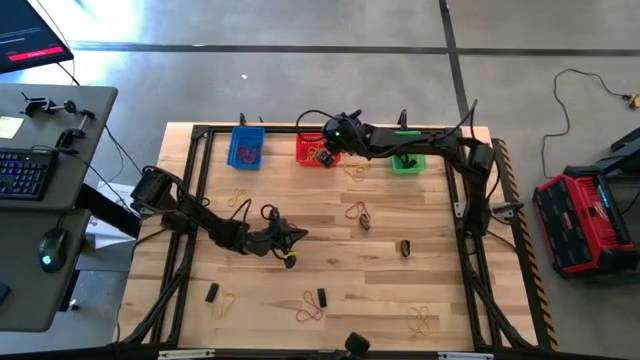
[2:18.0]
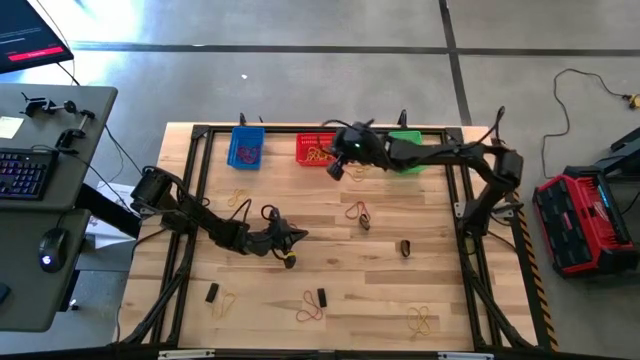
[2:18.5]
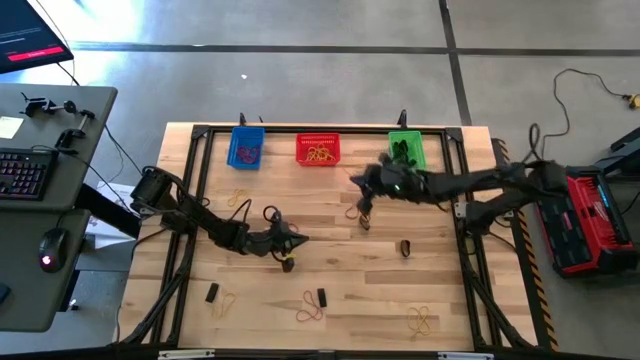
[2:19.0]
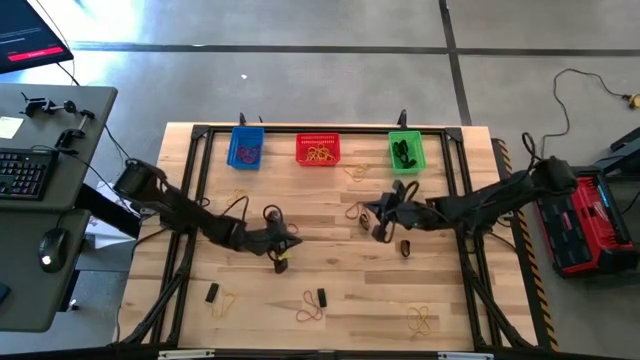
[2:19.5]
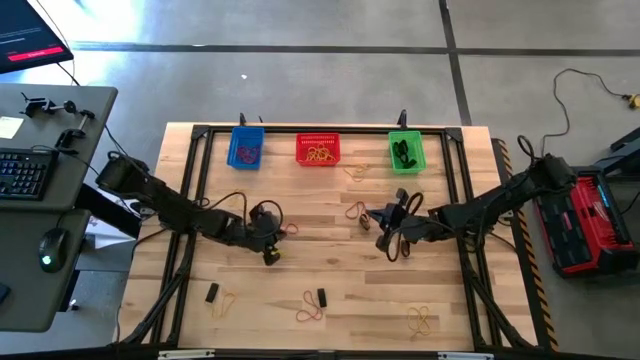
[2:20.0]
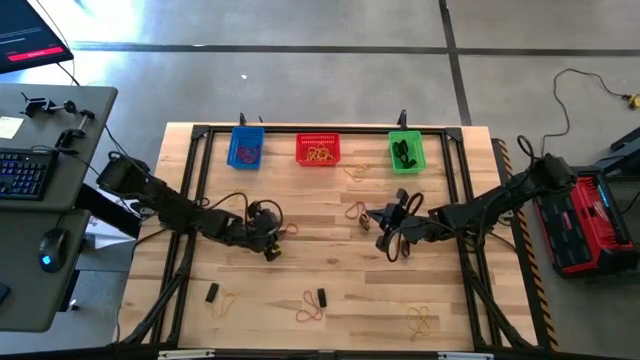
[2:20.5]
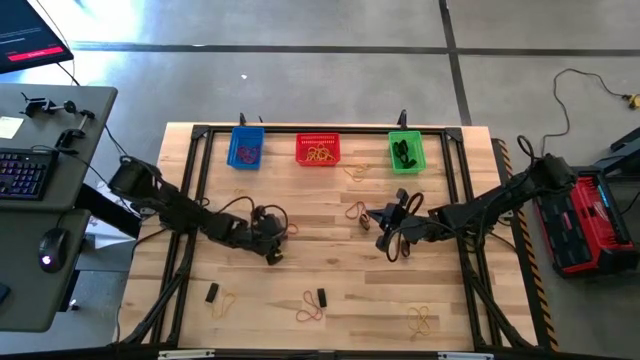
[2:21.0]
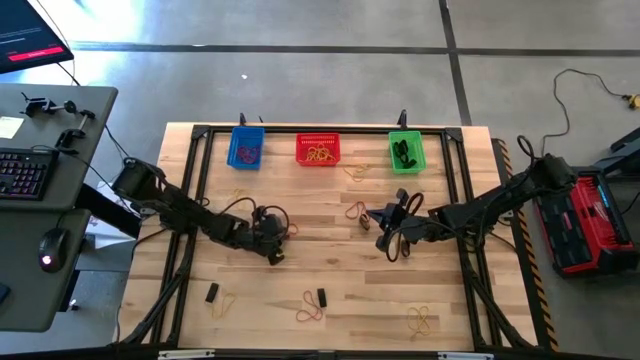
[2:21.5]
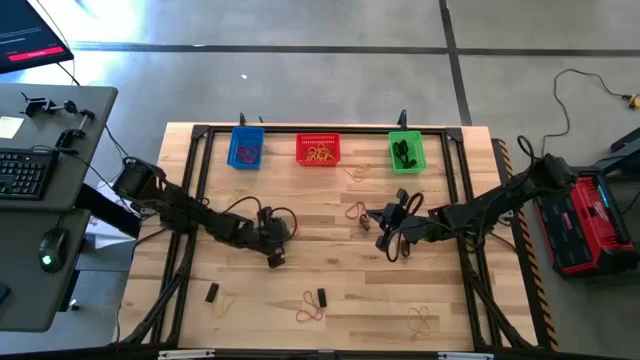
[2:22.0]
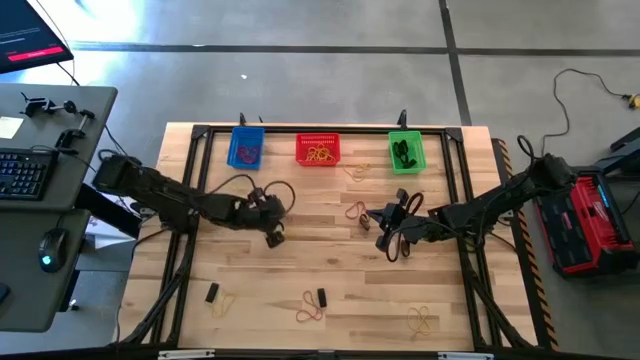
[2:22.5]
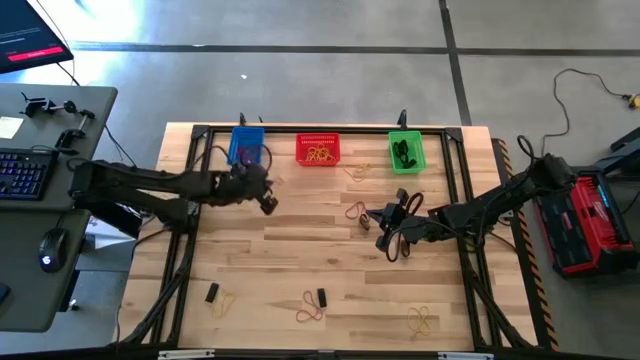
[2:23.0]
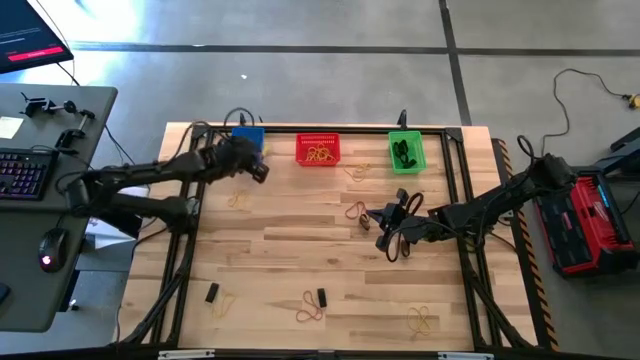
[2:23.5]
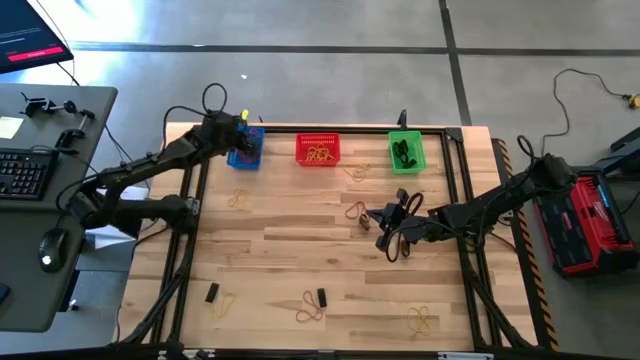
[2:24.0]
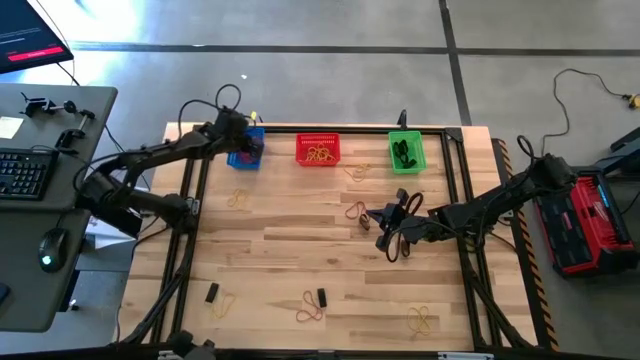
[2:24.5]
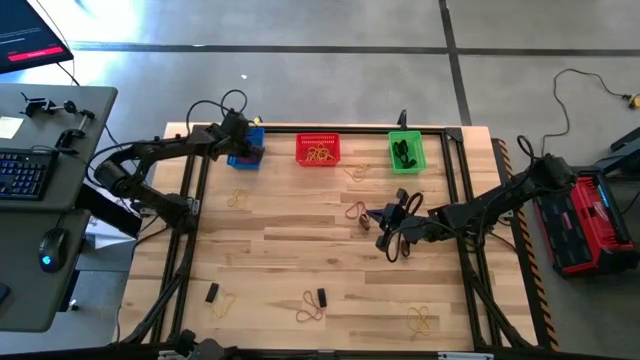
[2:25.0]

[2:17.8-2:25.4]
Task: Sort rubber bands into baskets
Put the orange rubberband into the blue bin

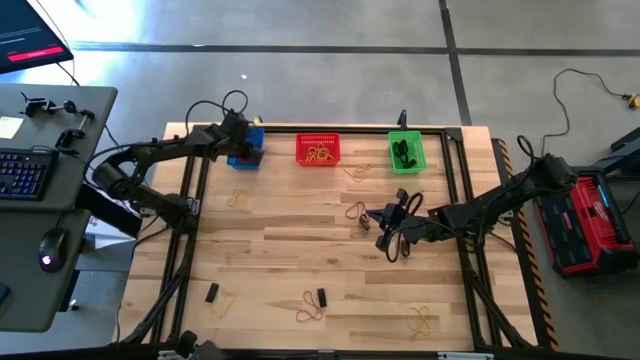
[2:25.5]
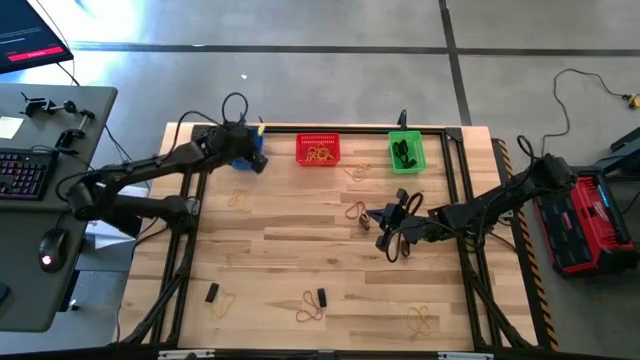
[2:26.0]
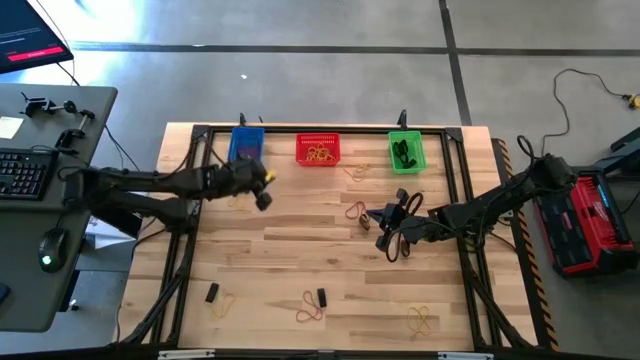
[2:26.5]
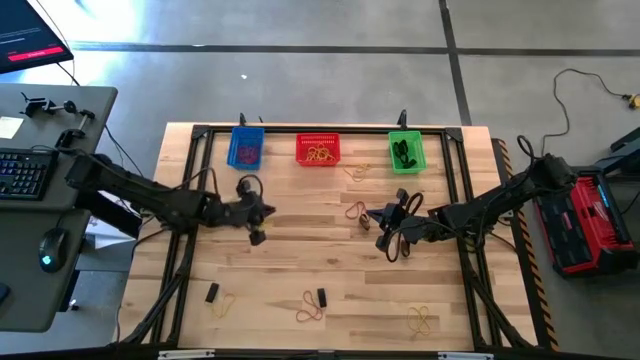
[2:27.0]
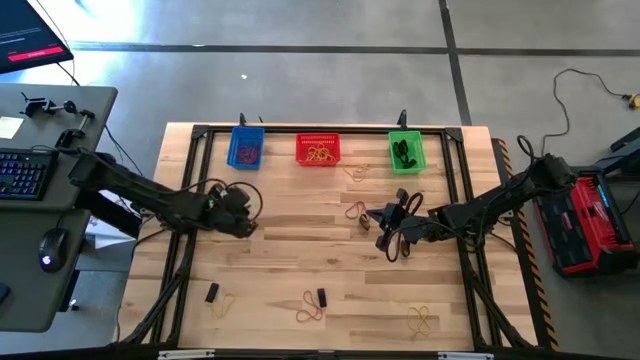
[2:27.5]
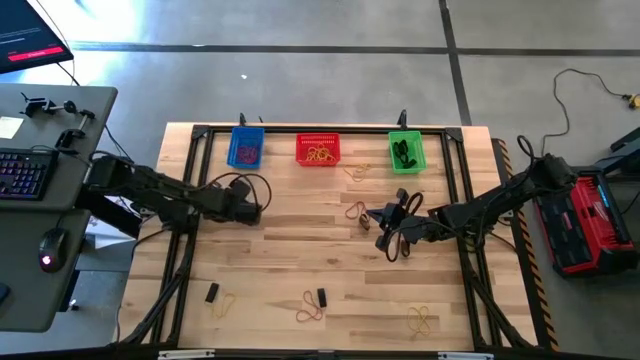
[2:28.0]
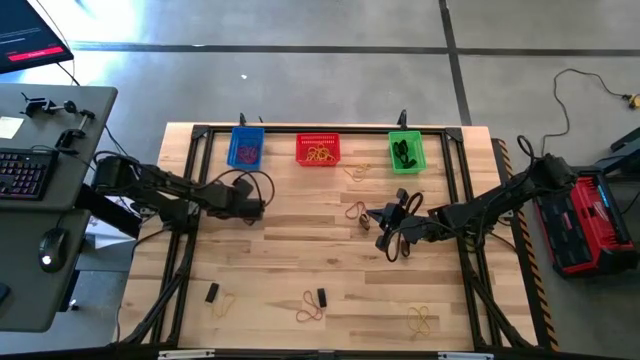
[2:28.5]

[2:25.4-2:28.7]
Put the left yellow rubberband into the orange bin

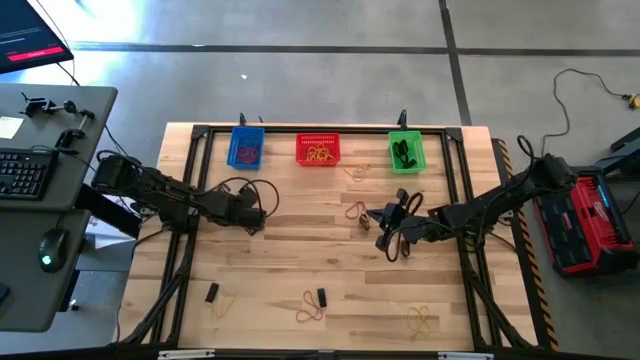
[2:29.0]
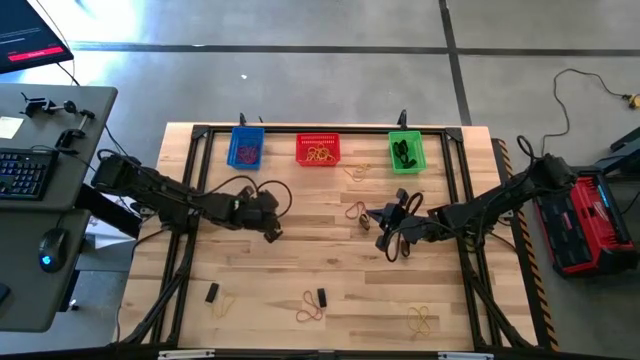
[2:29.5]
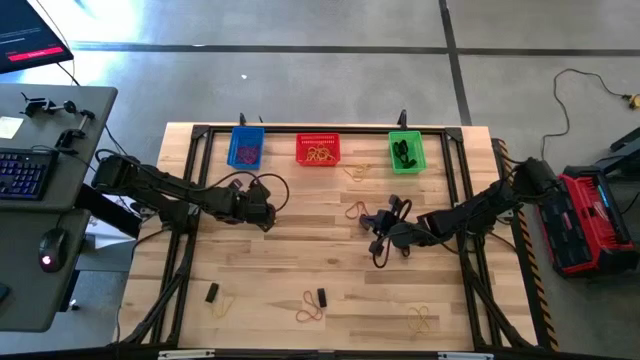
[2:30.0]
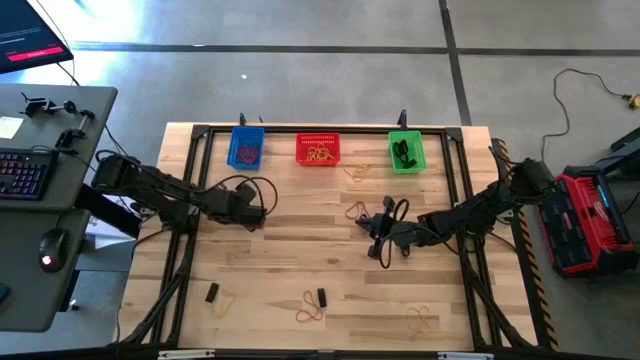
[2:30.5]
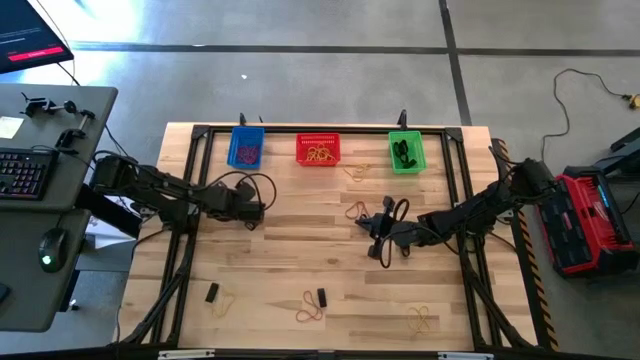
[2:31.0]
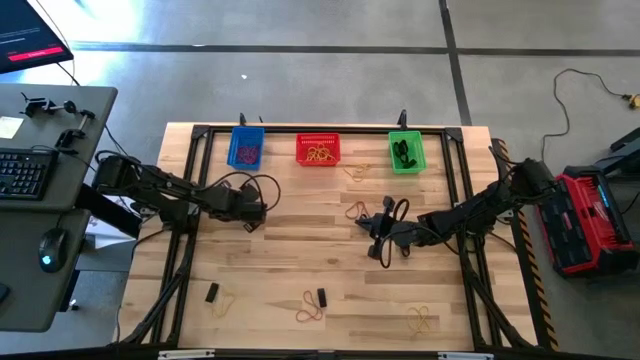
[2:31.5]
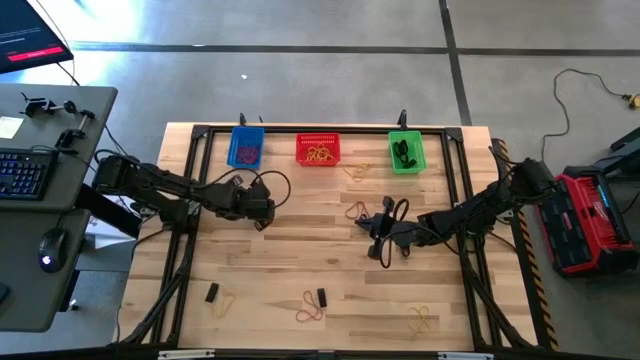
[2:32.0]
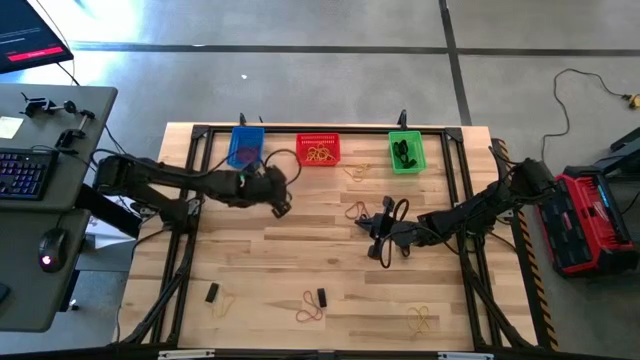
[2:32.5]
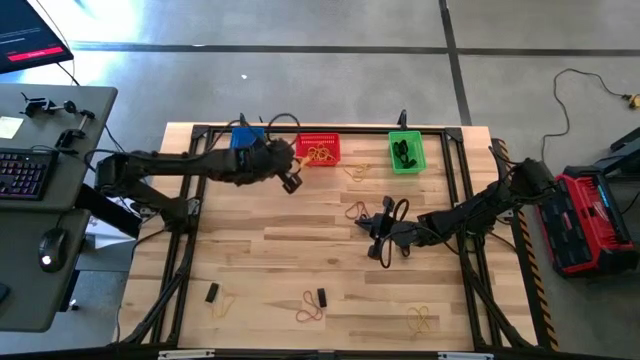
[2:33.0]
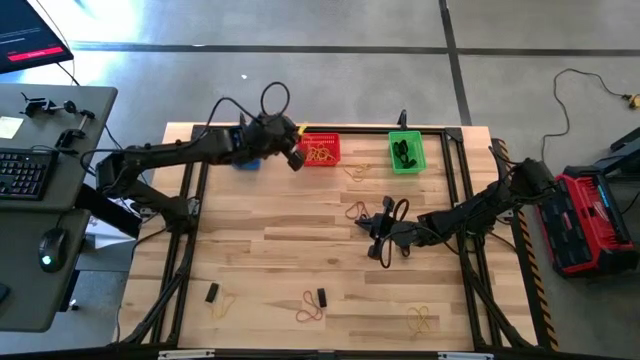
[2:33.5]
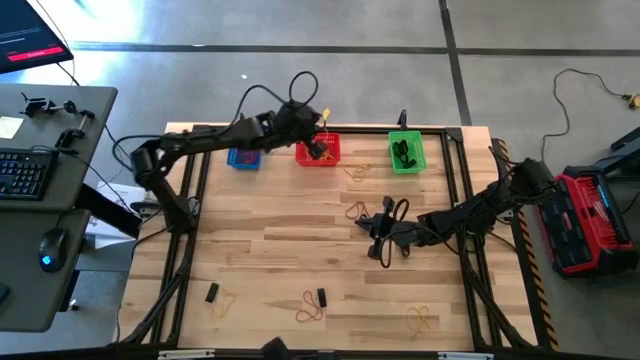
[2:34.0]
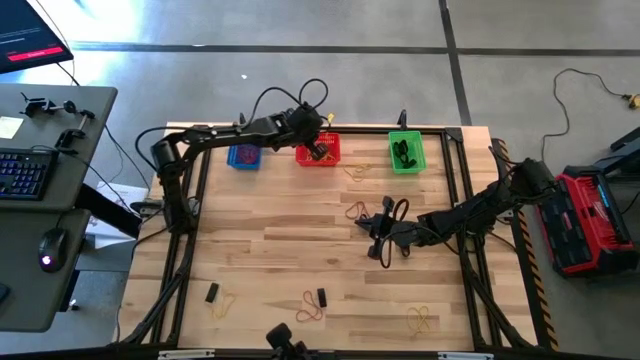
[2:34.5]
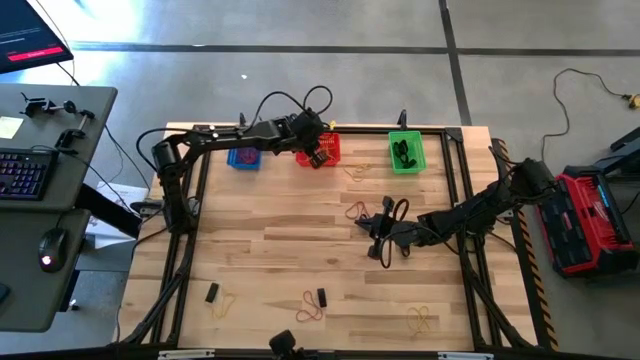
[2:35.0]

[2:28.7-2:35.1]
Put the yellow rubberband into the orange bin

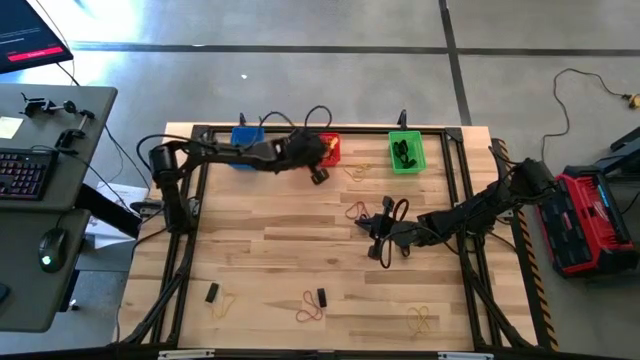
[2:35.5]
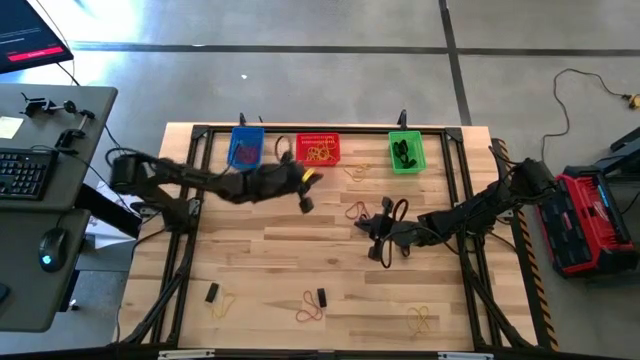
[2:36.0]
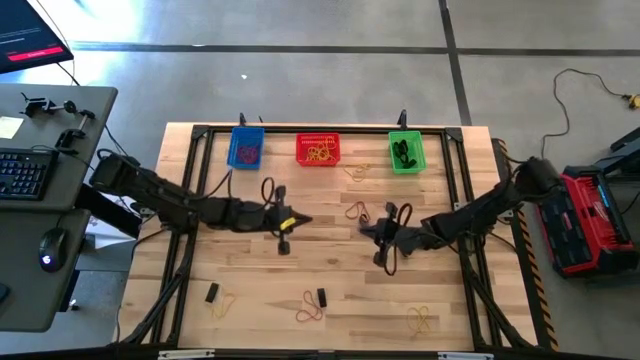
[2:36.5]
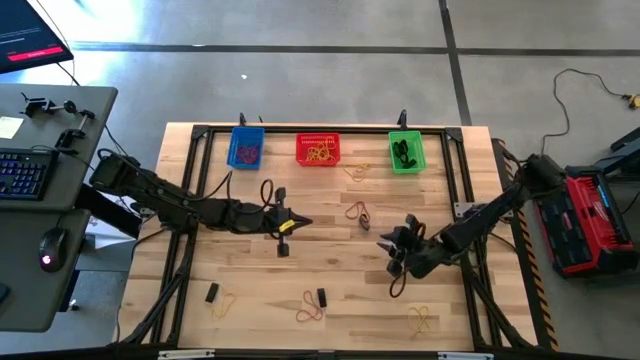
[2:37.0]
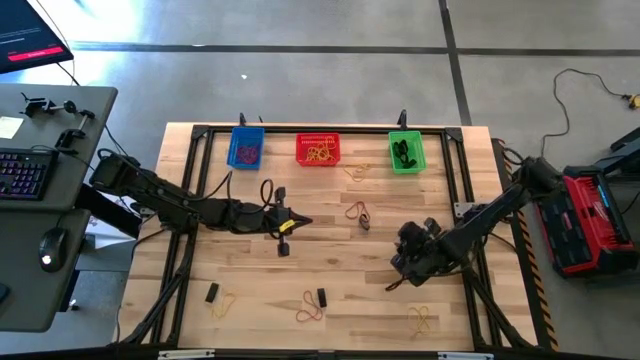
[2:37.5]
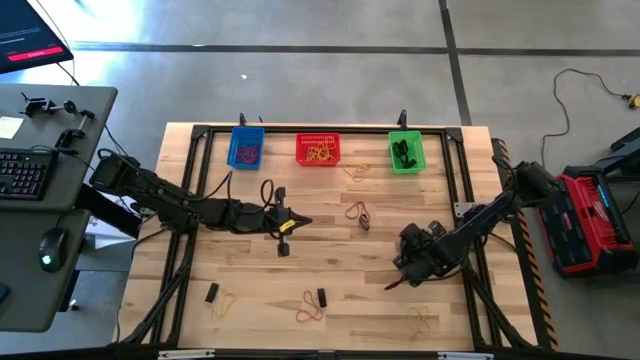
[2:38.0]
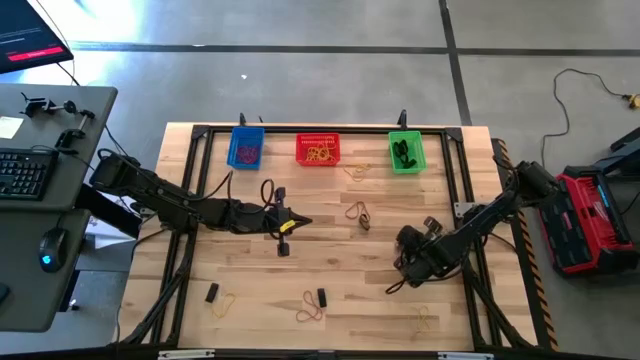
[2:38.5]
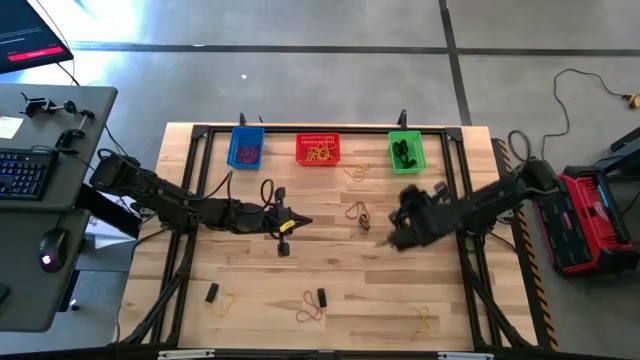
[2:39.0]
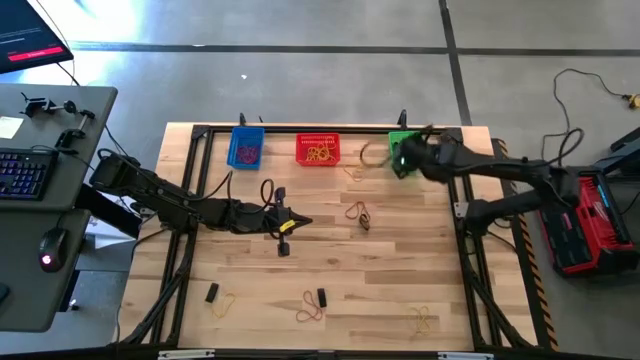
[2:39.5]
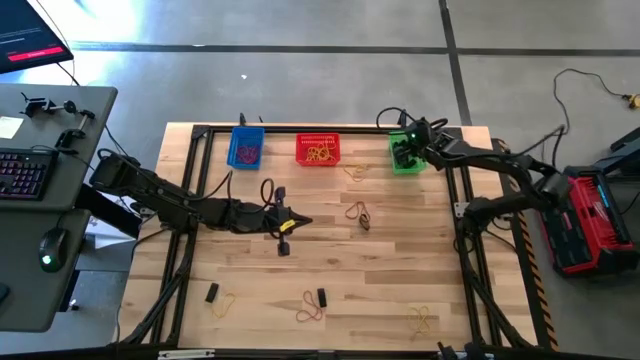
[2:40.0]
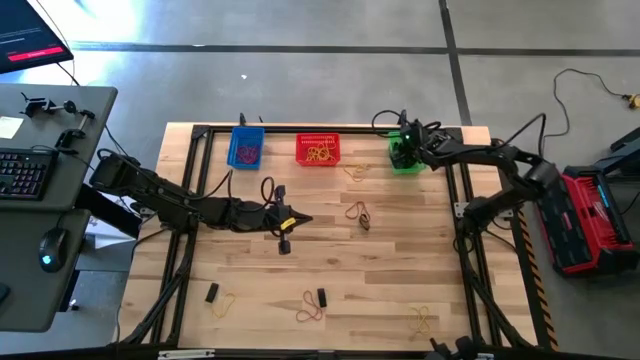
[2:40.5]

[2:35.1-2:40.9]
Put the black rubberband into the green bin
